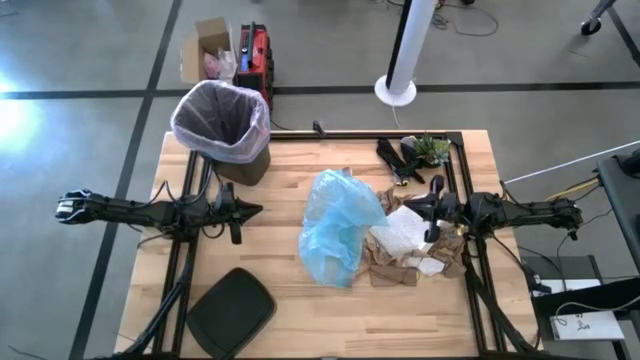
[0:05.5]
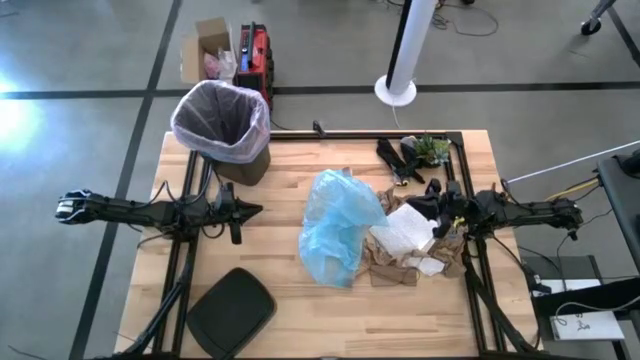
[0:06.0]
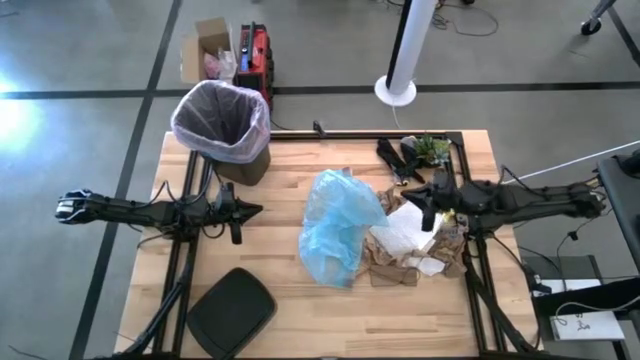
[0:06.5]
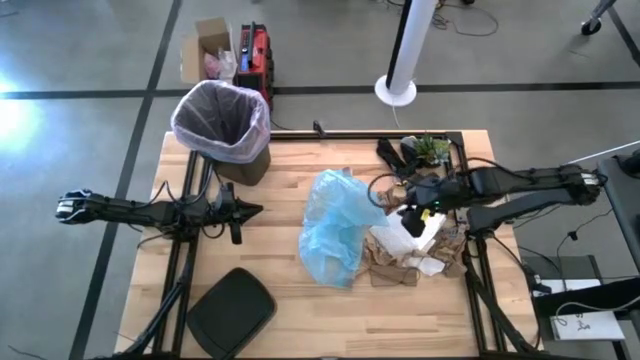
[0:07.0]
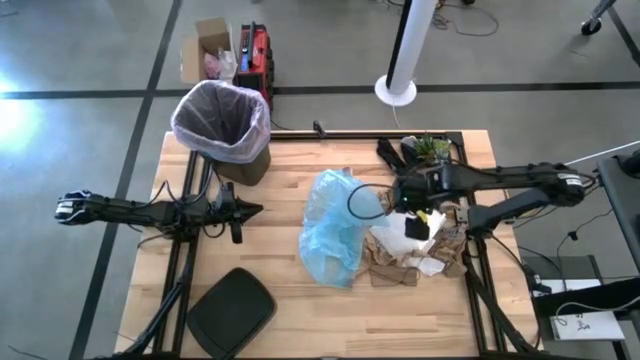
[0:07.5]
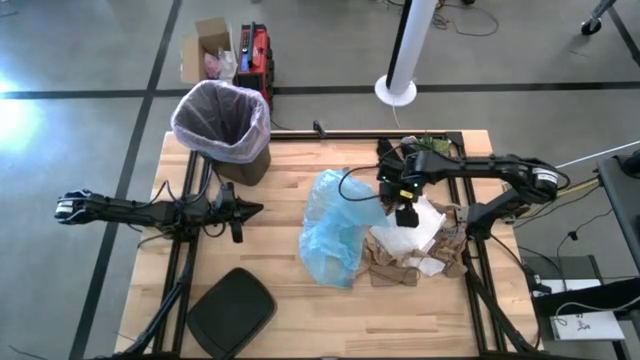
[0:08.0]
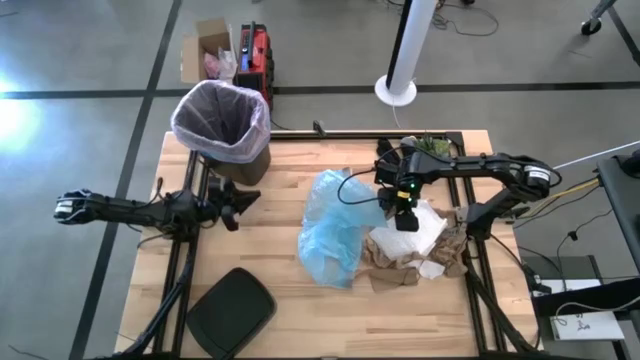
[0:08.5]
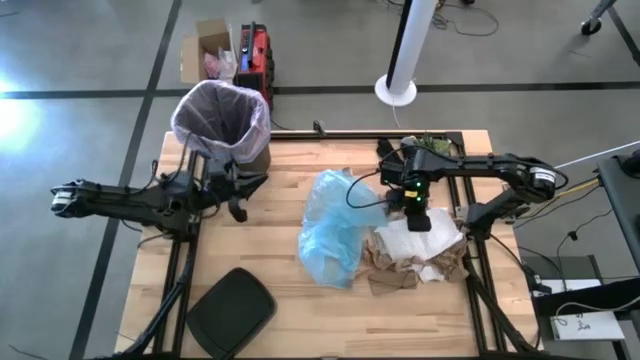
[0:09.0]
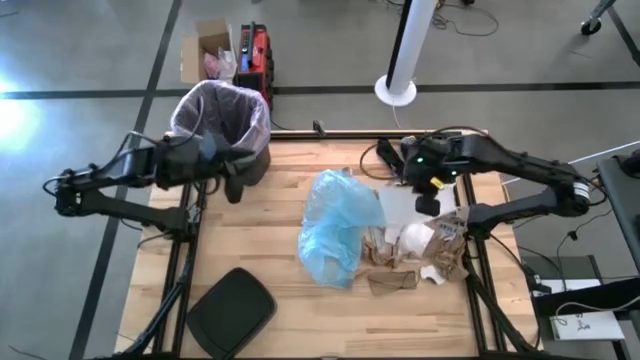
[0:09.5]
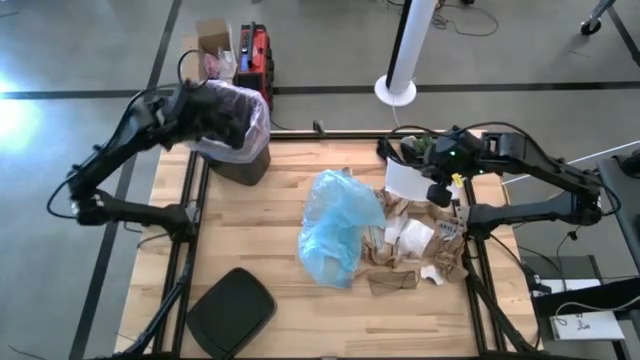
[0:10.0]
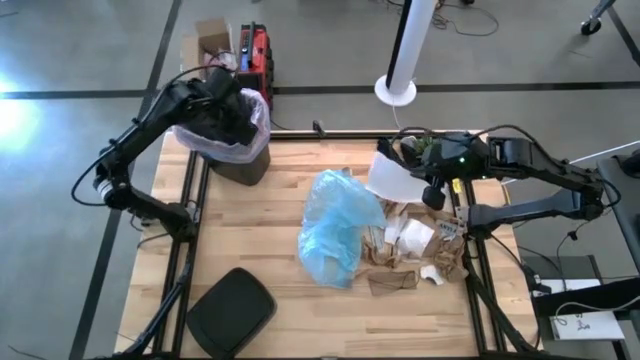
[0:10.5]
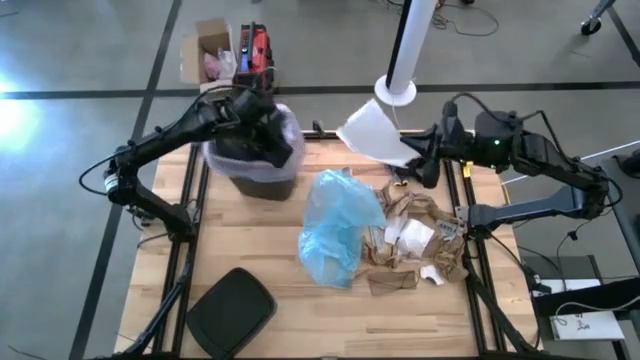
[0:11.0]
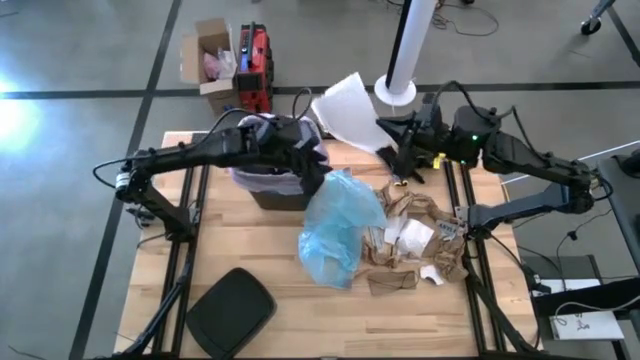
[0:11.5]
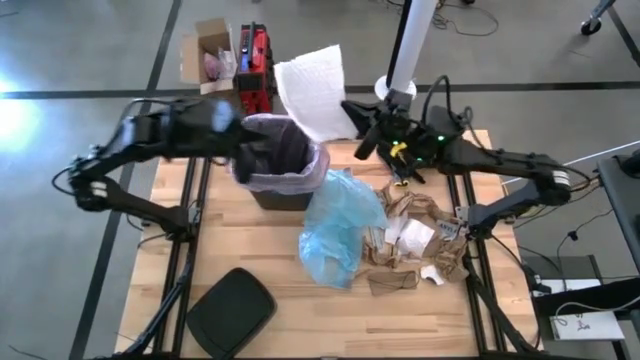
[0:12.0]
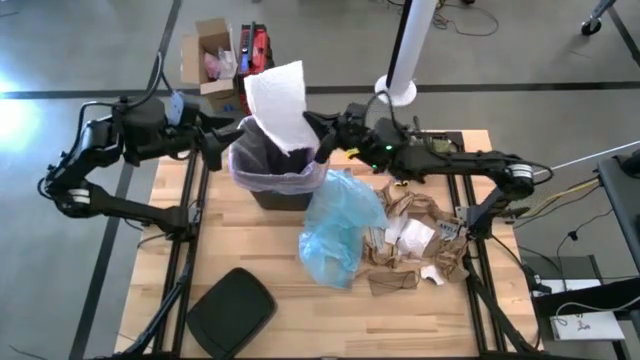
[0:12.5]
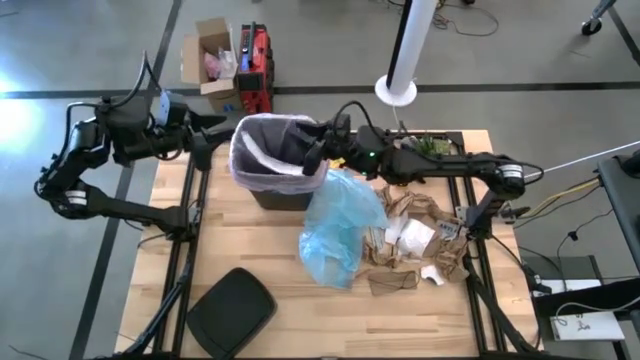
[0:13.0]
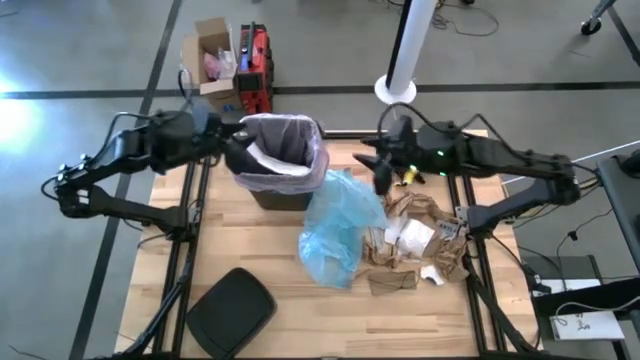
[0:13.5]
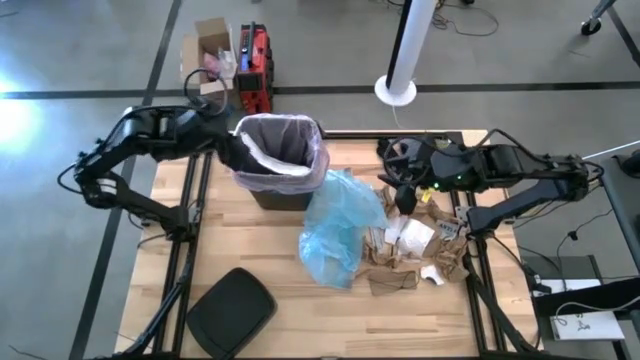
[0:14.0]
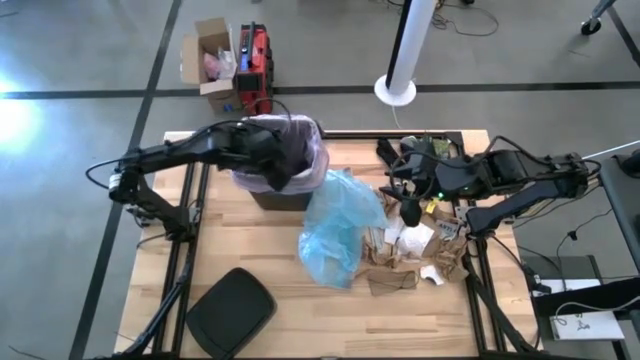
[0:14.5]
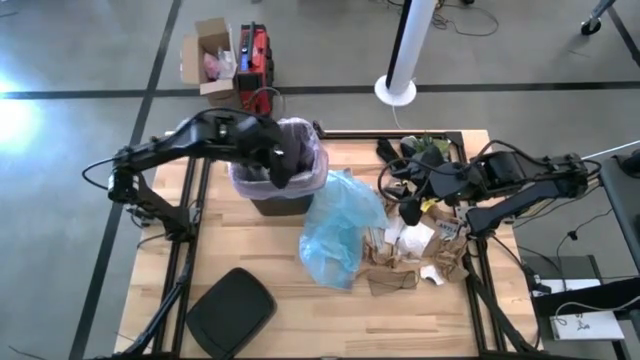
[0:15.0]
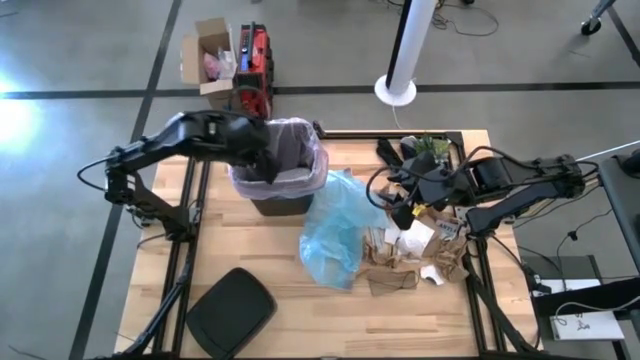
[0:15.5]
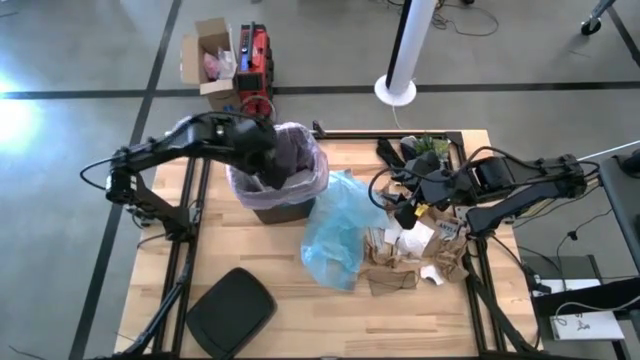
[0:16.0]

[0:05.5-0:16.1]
Task: place trash/remove bag and relplace
Put the white plastic into the trash bin

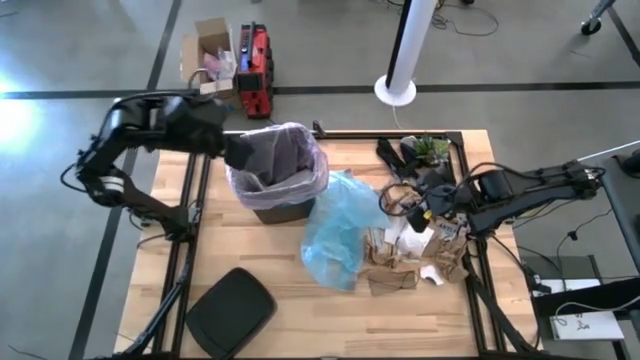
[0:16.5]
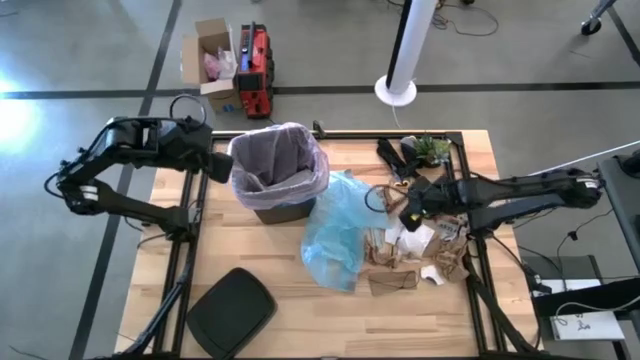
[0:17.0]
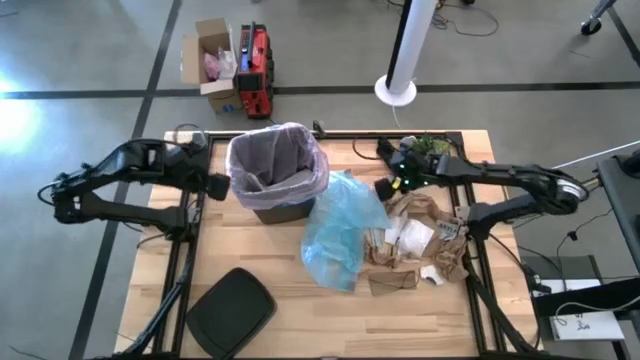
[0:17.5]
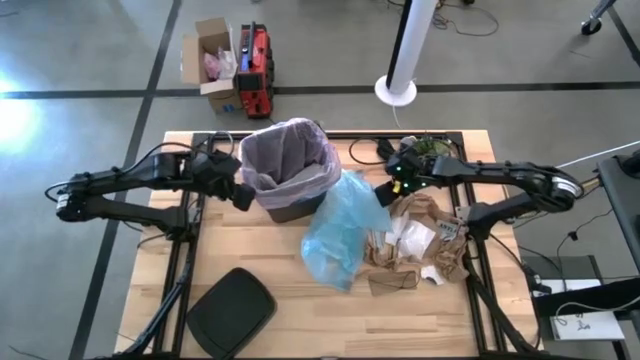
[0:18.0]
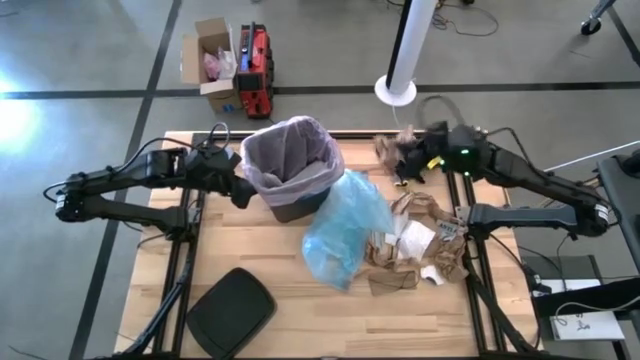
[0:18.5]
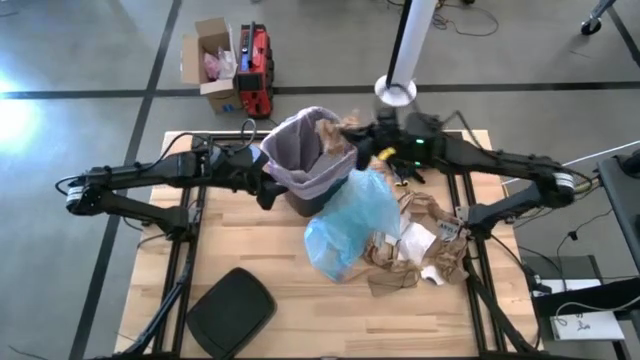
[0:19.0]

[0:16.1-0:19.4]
Put the brown napkin into the trash bin

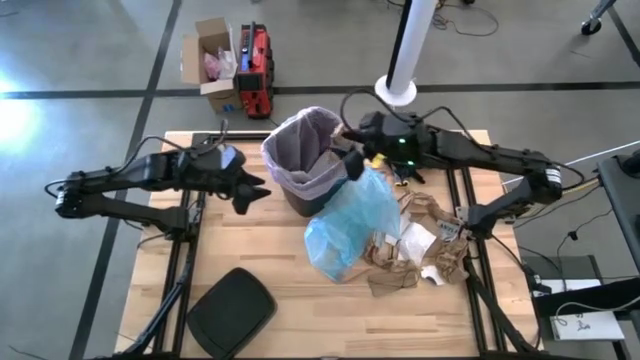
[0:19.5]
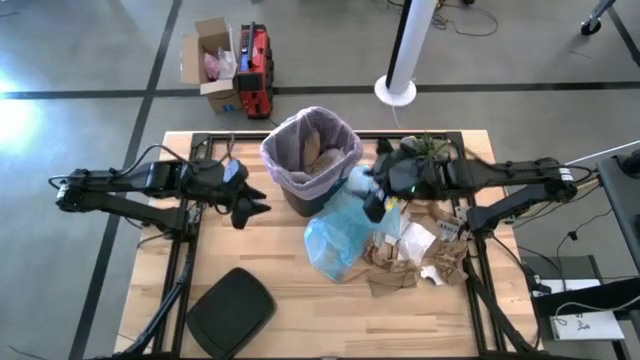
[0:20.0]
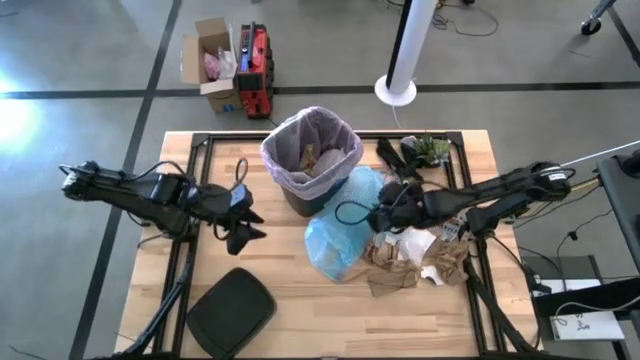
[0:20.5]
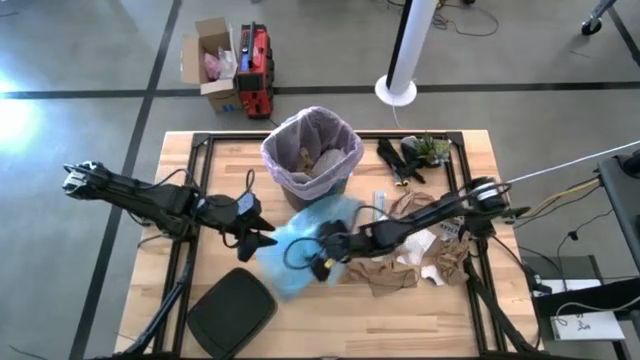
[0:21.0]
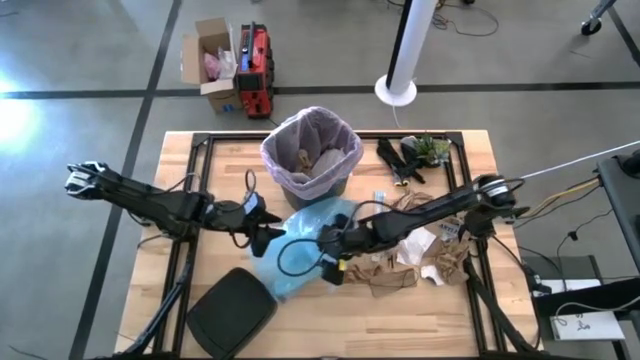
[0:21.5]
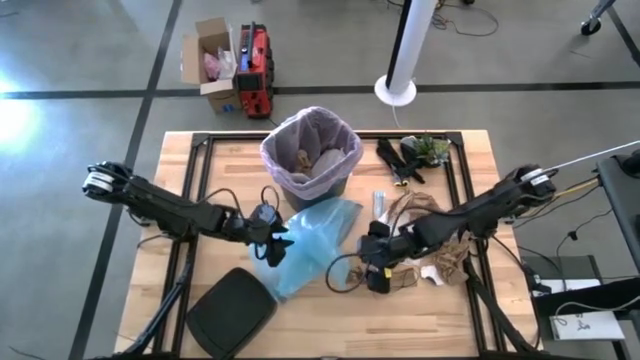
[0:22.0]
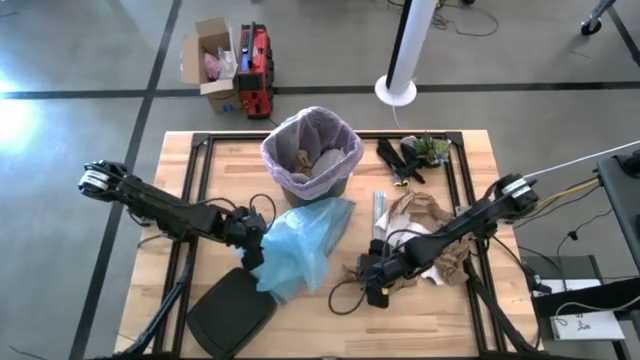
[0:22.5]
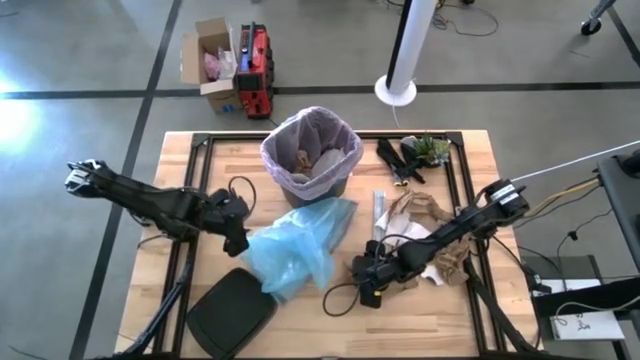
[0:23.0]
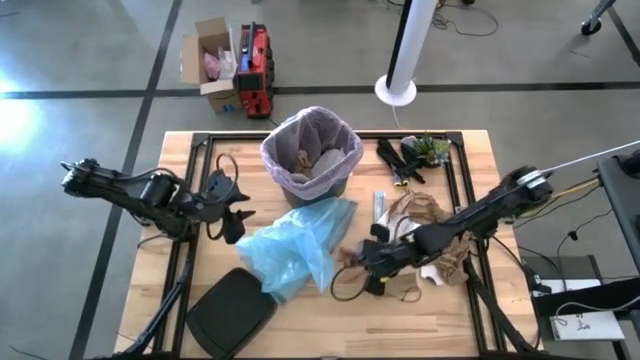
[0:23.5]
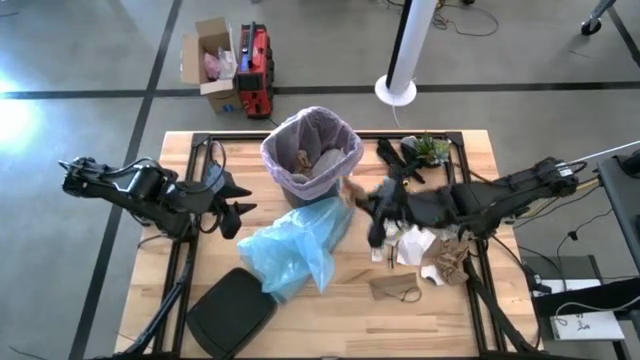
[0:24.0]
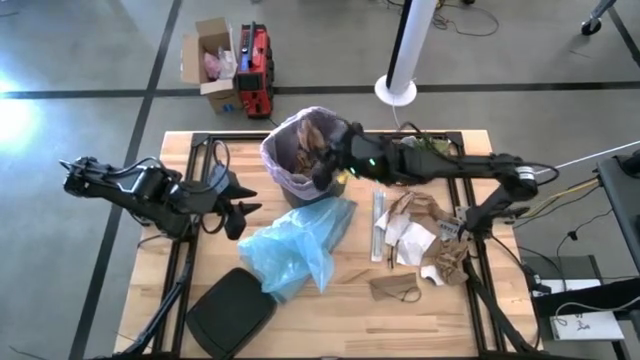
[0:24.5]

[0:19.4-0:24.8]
Put the brown napkin into the trash bin

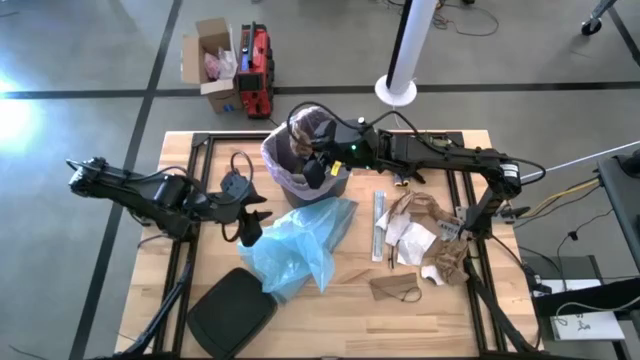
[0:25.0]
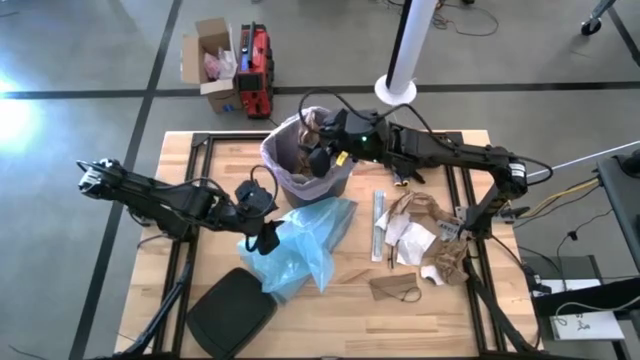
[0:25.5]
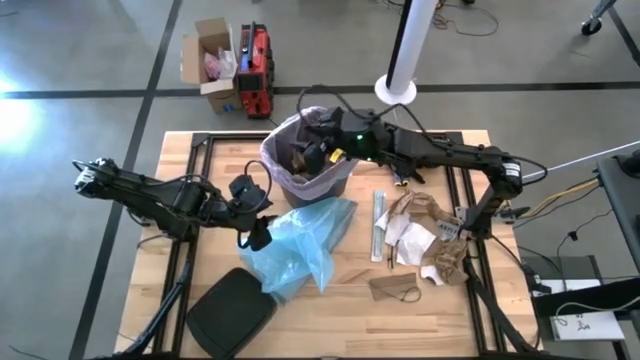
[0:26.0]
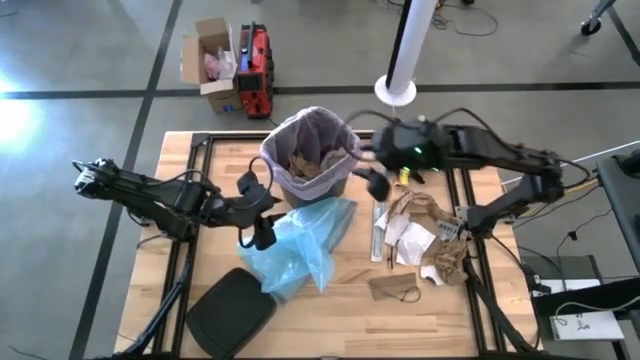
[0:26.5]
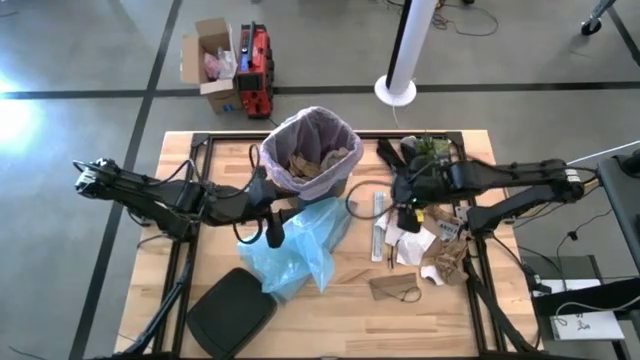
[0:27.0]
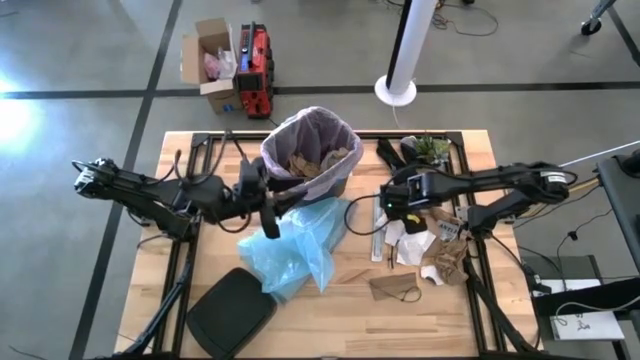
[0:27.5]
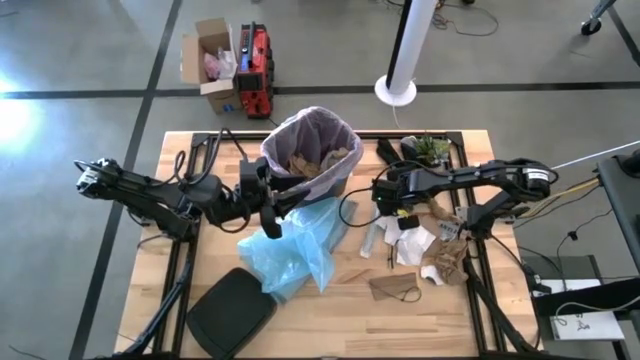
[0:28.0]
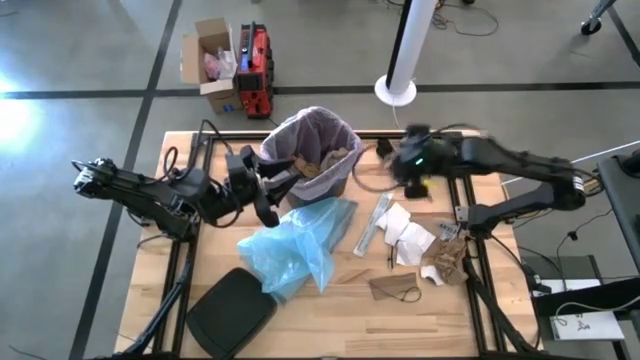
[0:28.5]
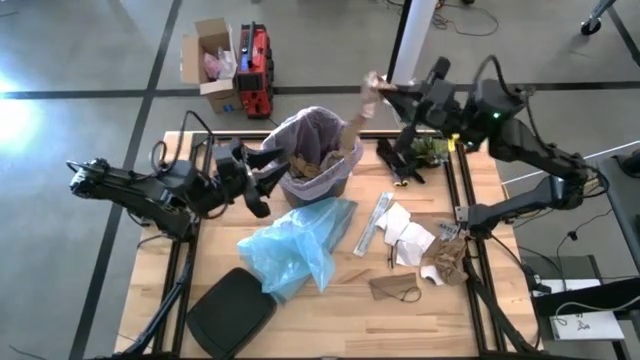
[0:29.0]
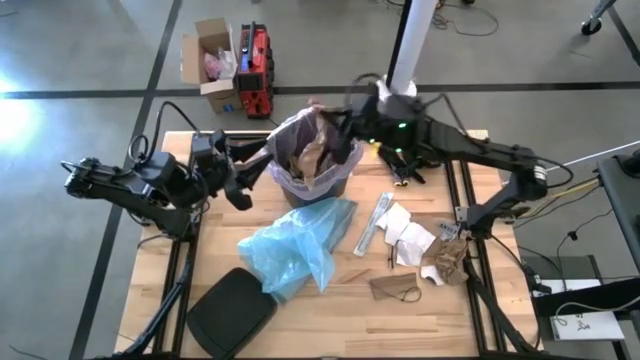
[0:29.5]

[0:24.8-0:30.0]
Put the brown napkin into the trash bin
